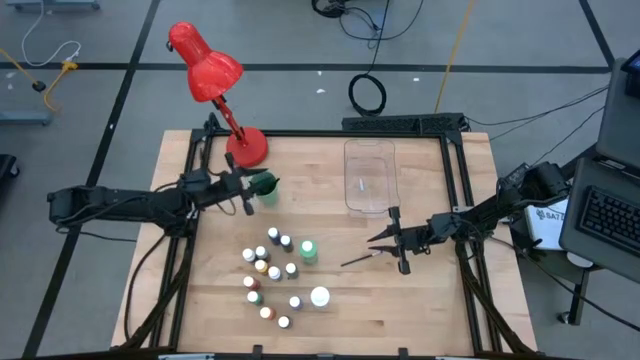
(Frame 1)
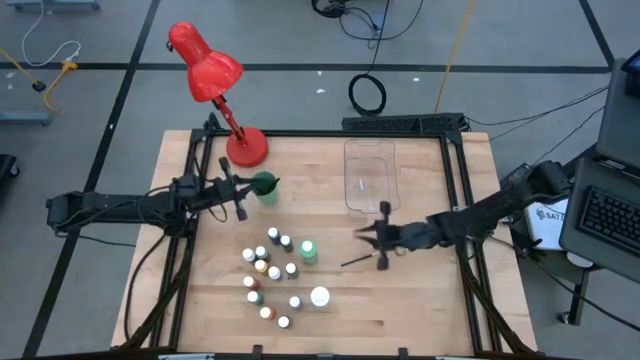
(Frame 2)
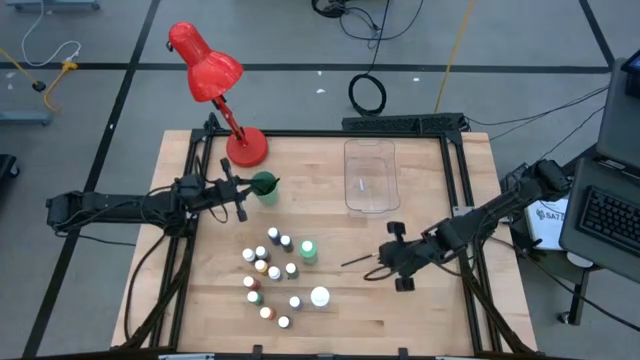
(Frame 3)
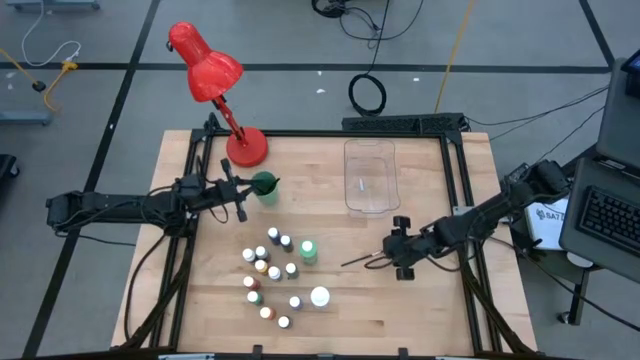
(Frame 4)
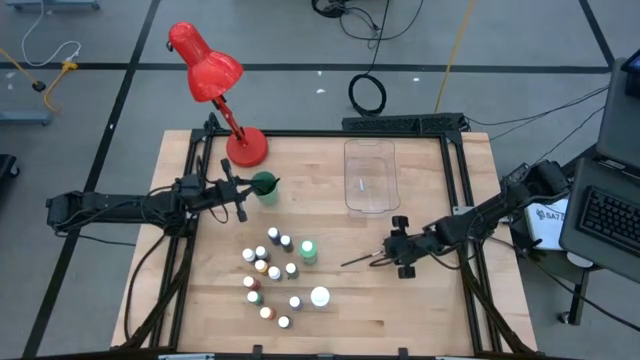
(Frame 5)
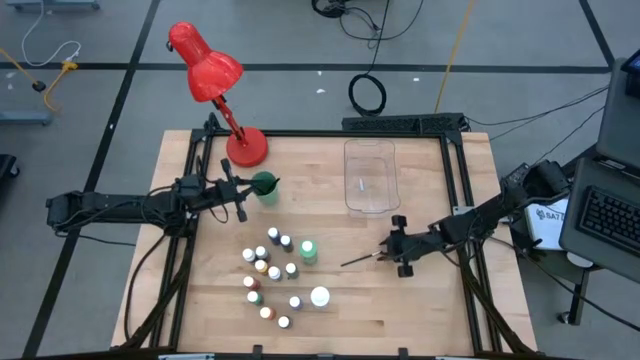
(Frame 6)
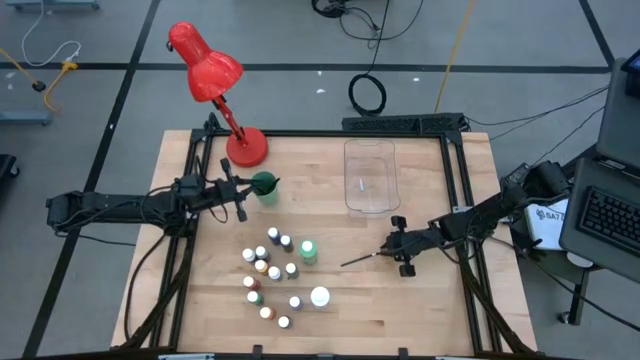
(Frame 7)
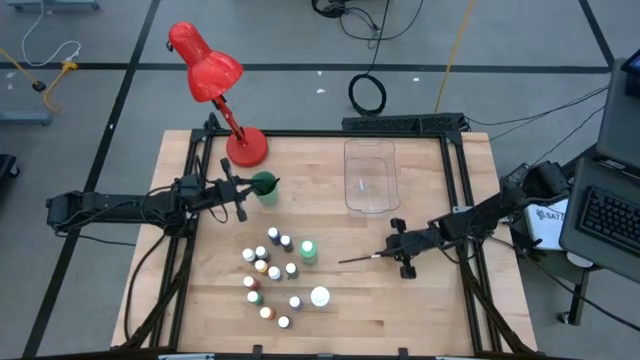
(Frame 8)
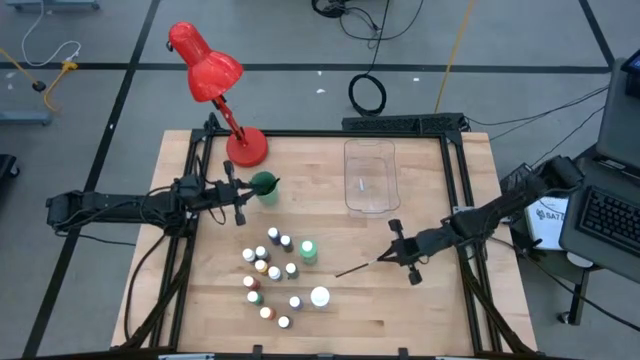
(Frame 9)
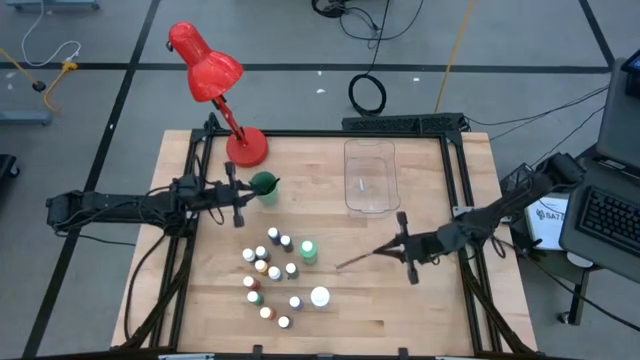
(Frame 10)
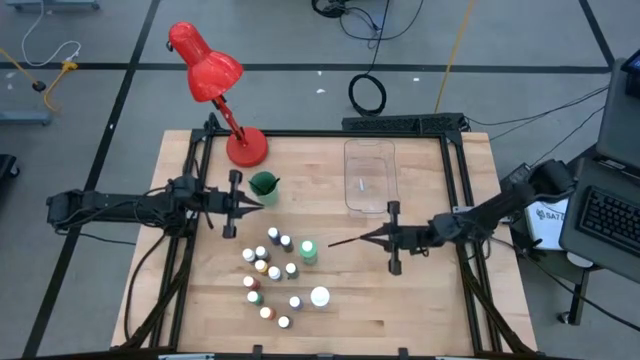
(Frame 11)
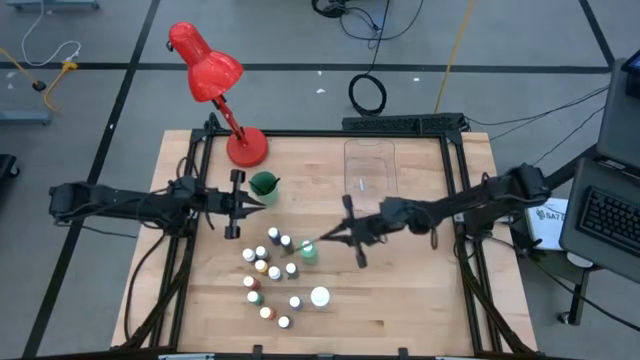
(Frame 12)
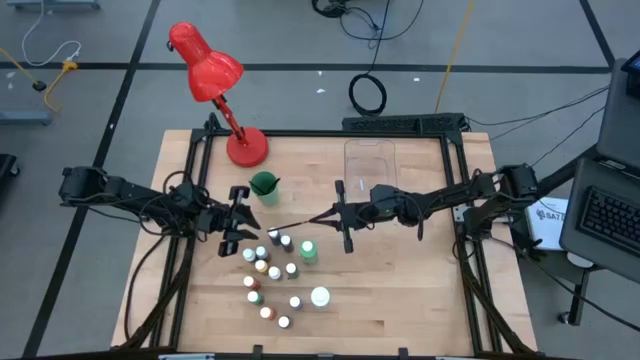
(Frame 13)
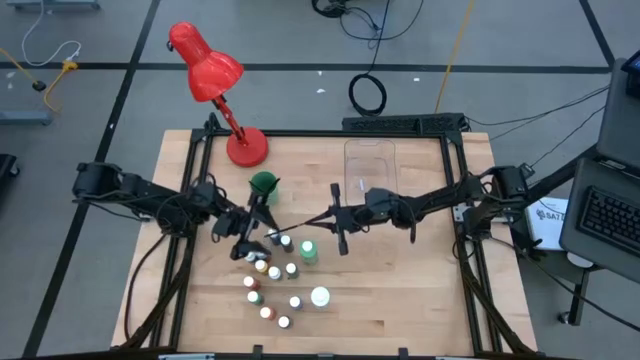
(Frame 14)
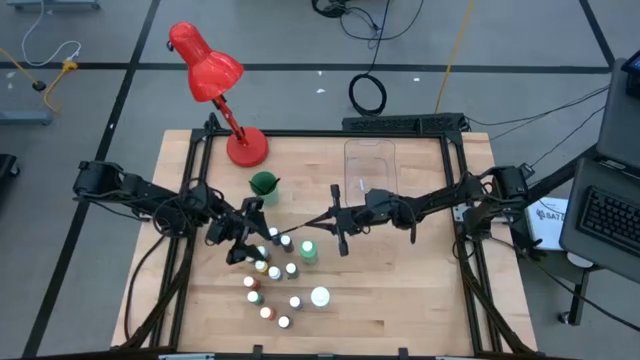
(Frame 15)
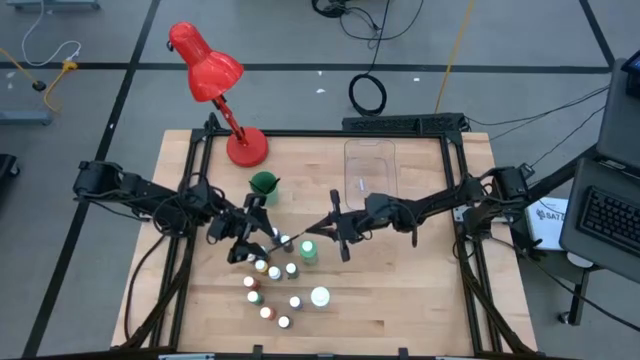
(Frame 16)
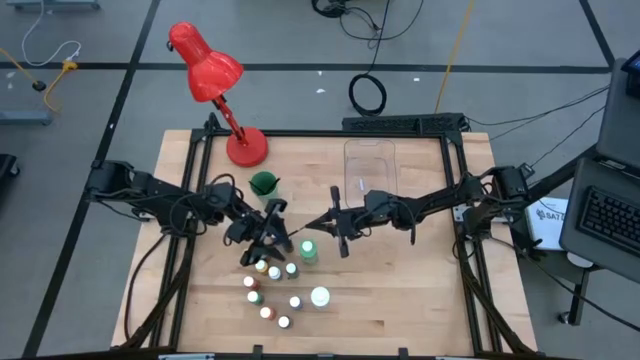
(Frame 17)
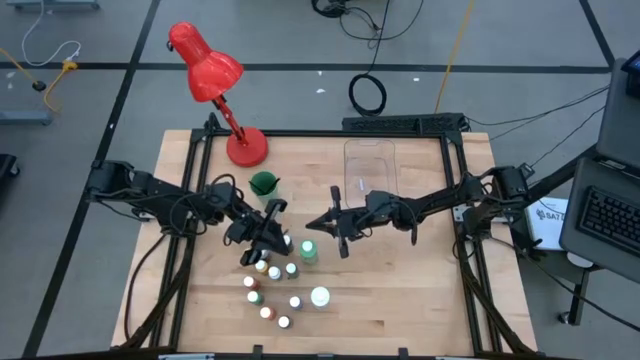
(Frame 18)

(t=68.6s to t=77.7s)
Task: Pick & Place Paint Supplies
Put the silver paint brush into the green cup

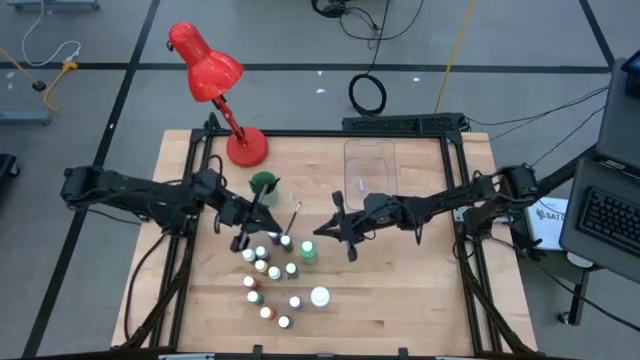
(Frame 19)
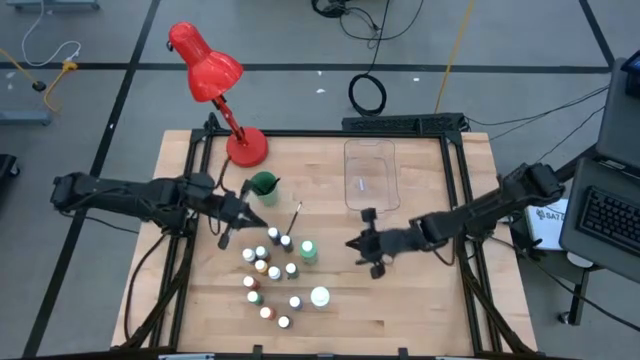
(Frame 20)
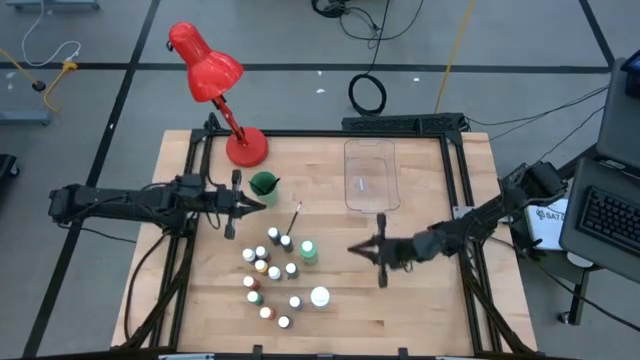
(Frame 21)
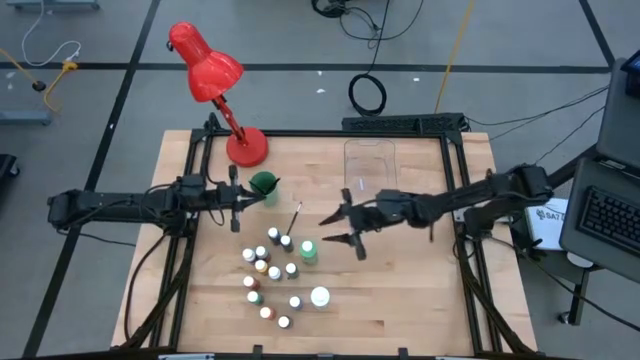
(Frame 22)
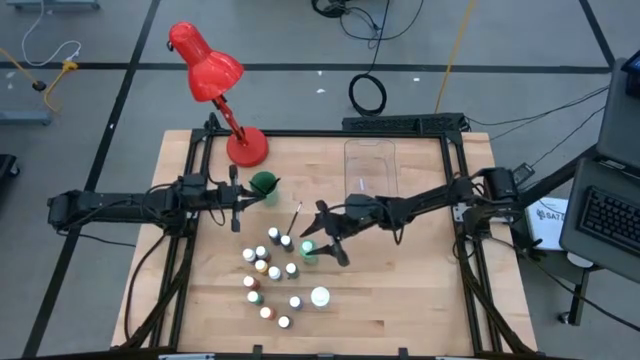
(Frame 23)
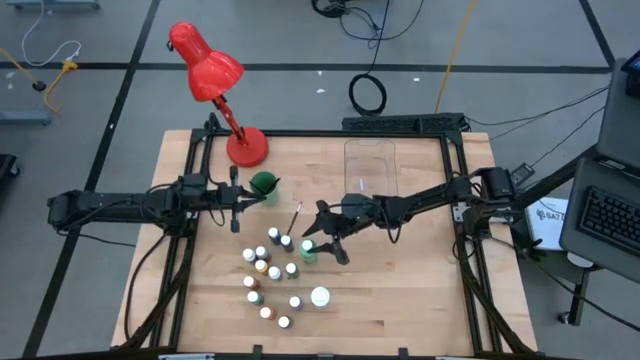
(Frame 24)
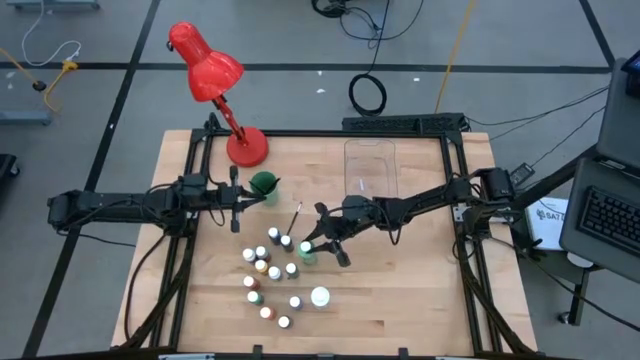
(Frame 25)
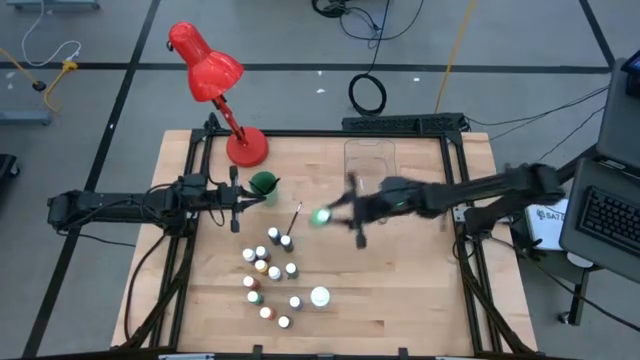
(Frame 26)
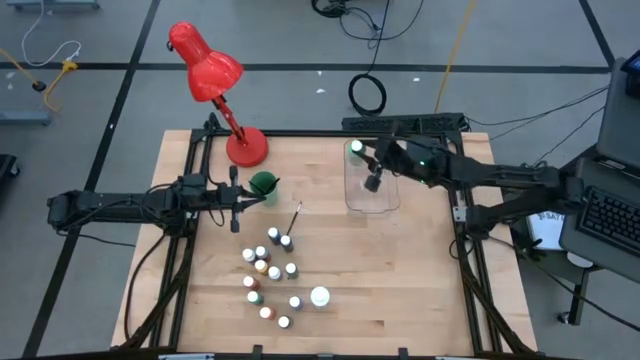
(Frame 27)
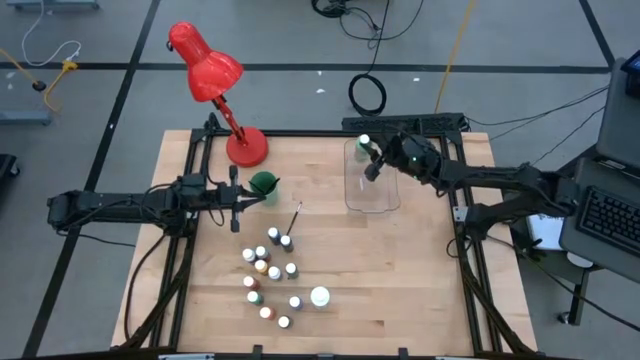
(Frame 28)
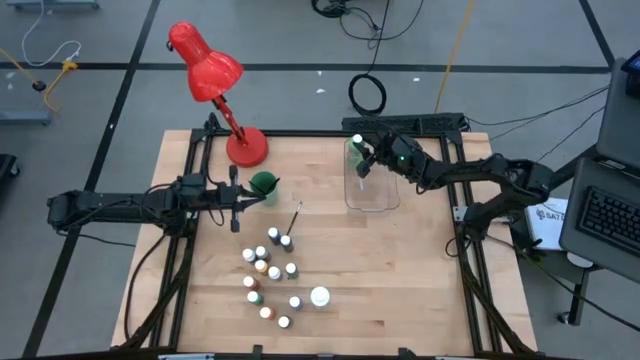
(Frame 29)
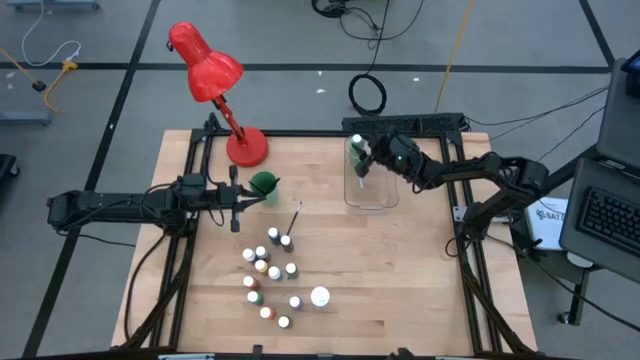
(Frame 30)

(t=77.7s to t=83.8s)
Put the large green paint bottle into the transparent bin

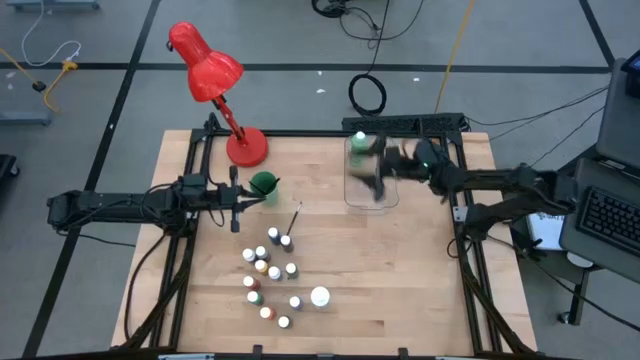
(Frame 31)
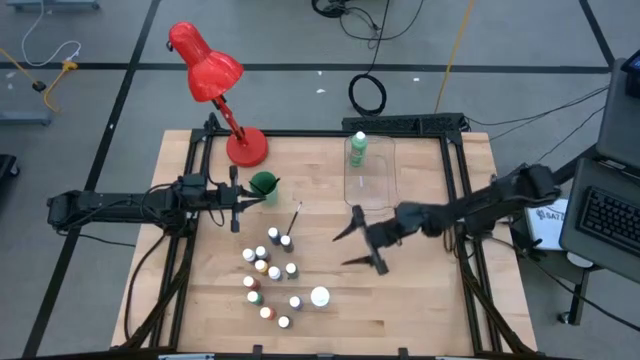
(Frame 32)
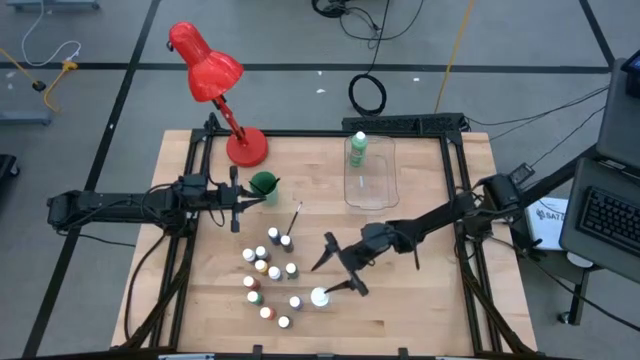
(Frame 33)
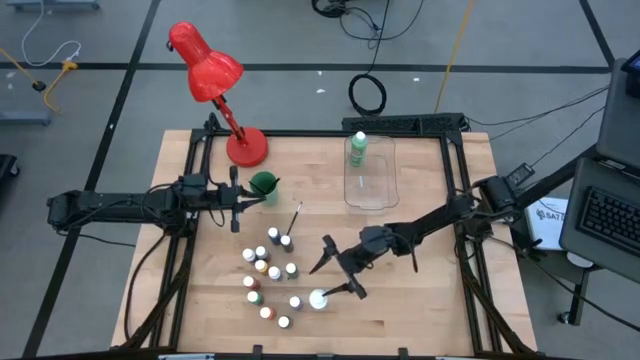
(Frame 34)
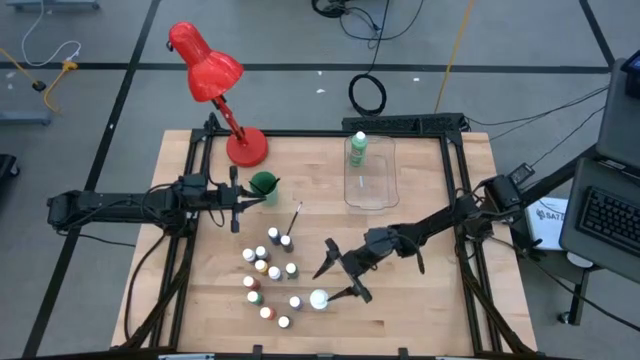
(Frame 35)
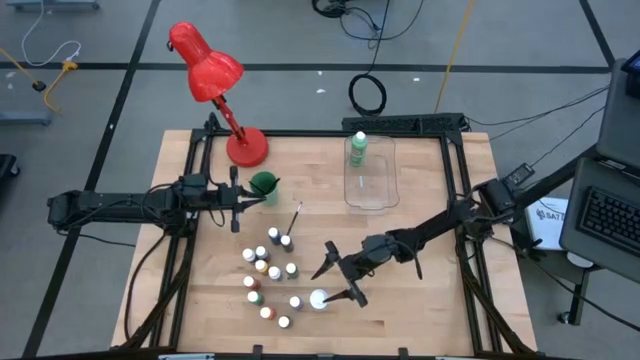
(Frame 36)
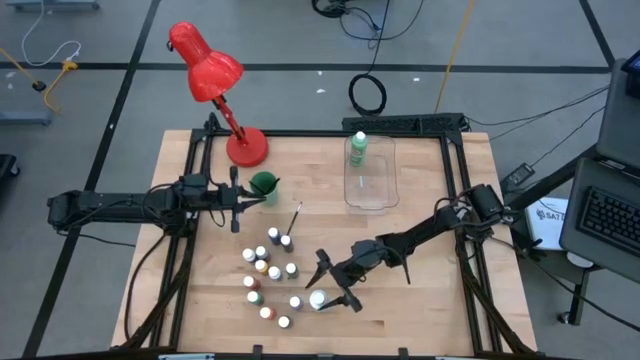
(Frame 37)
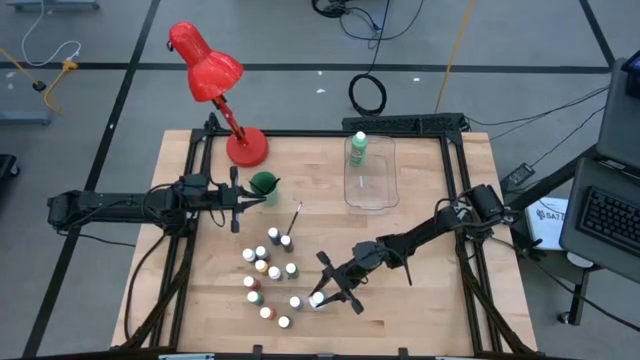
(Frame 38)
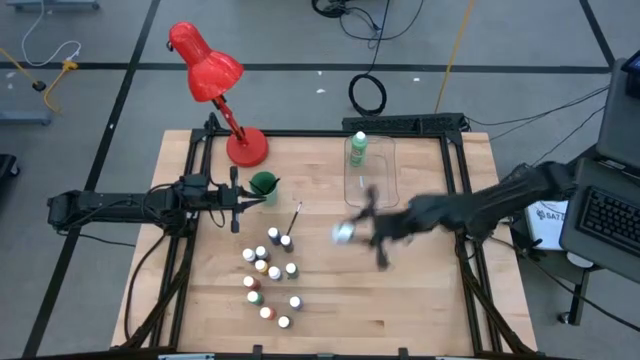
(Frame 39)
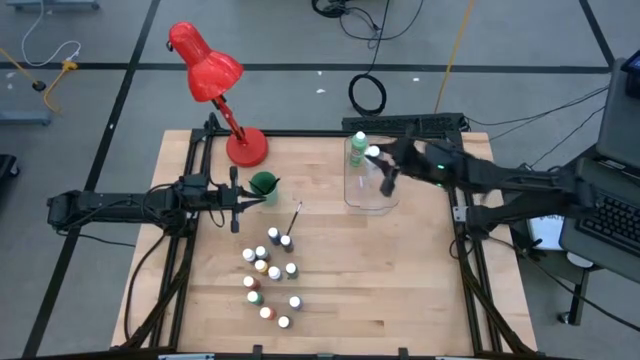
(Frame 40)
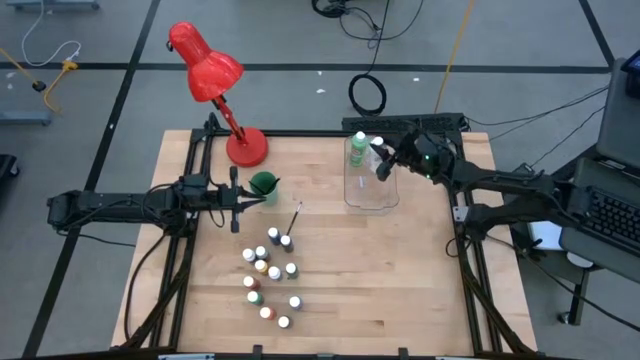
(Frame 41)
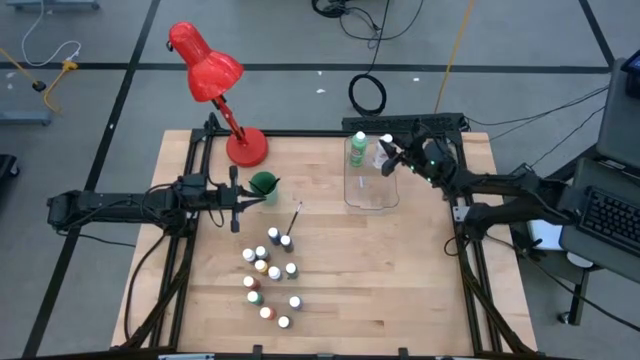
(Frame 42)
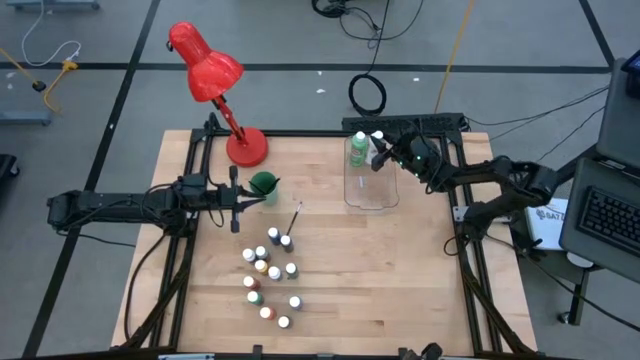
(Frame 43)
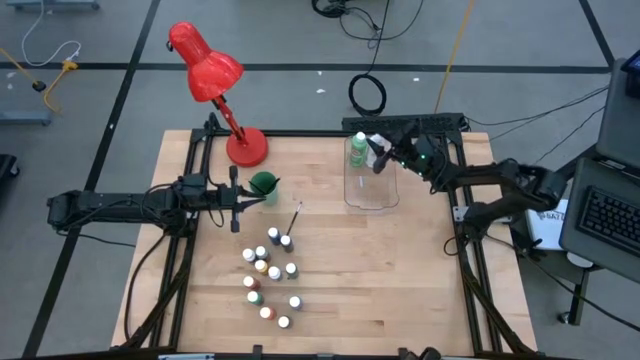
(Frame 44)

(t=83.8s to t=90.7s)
Put the large white paint bottle into the transparent bin
